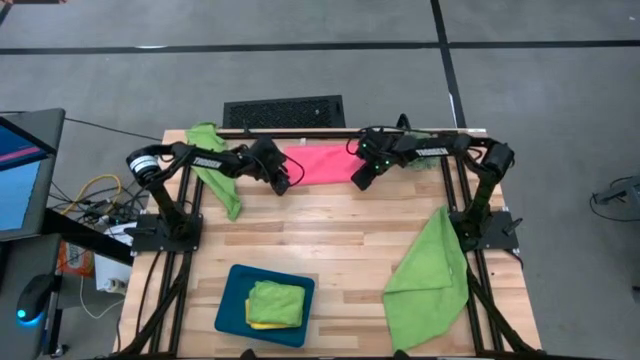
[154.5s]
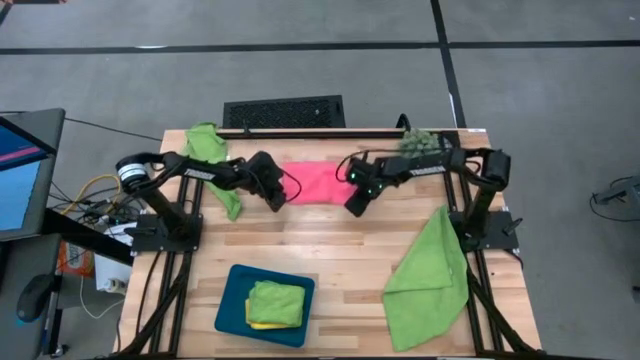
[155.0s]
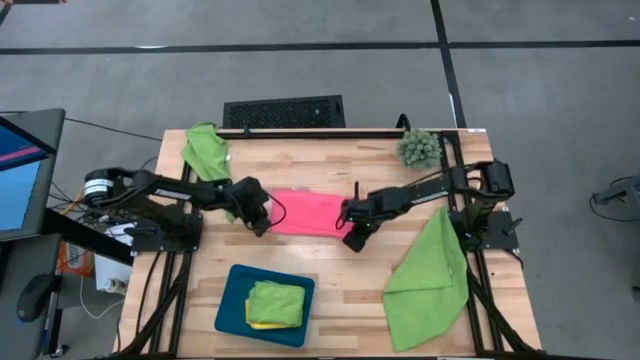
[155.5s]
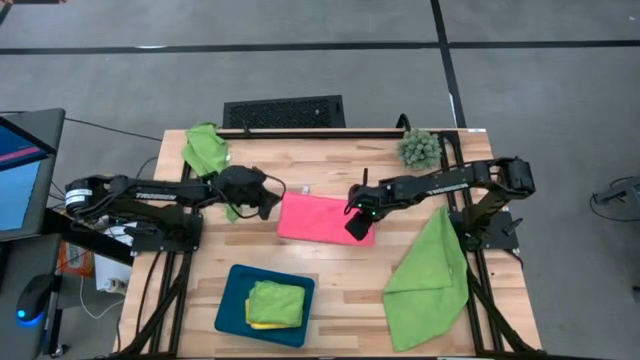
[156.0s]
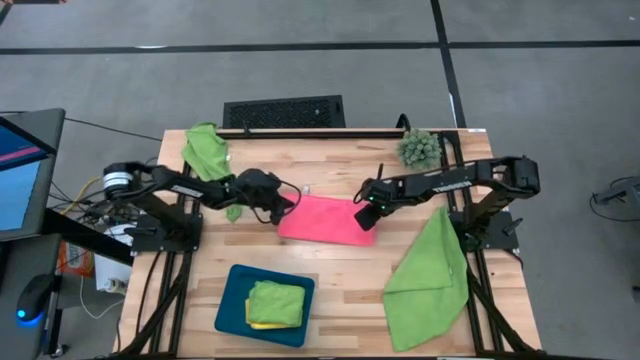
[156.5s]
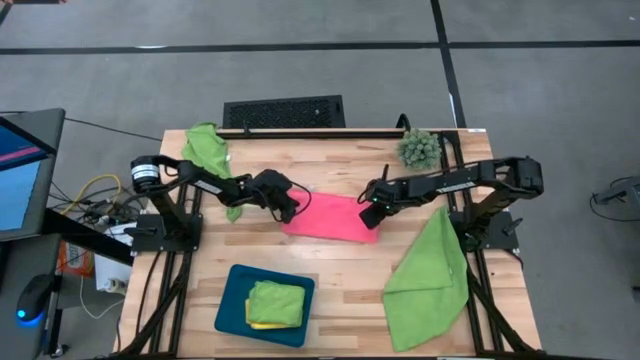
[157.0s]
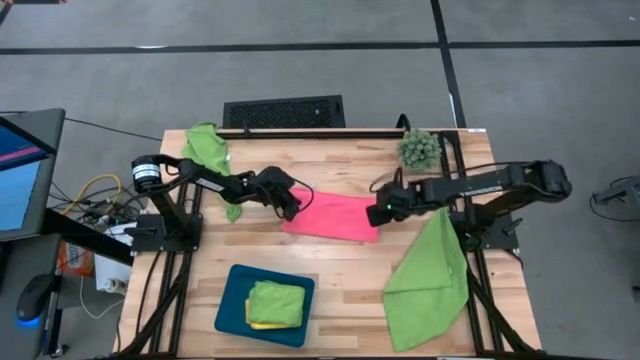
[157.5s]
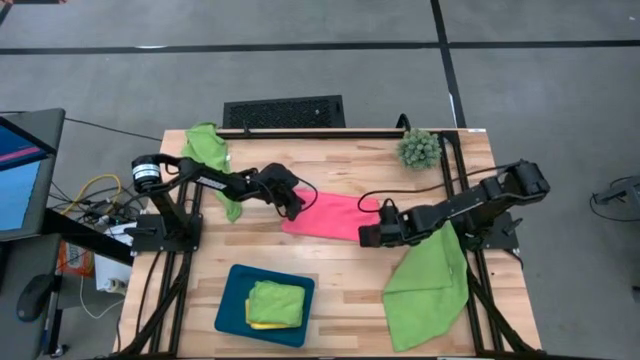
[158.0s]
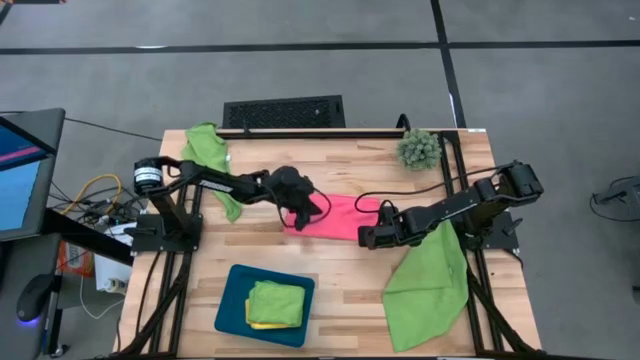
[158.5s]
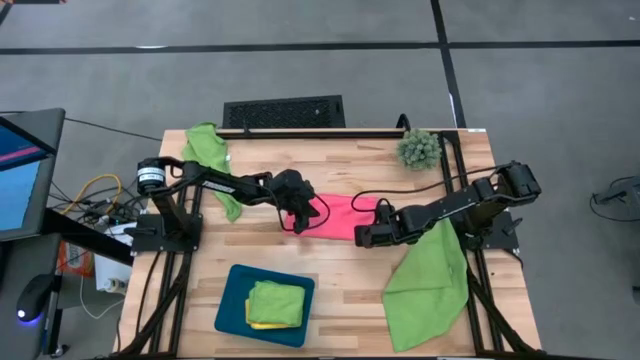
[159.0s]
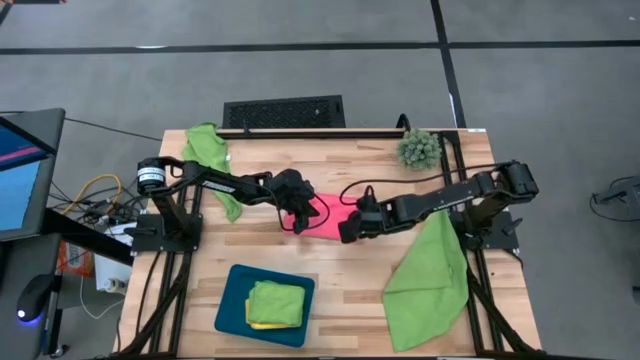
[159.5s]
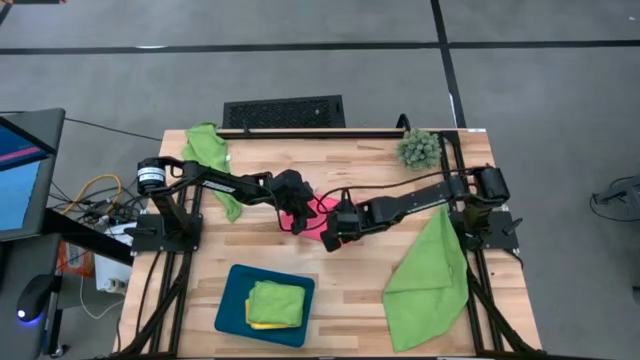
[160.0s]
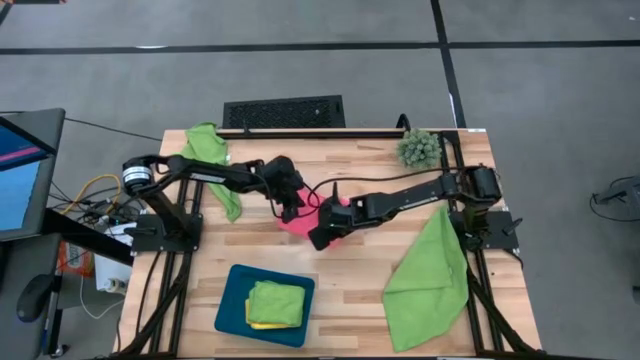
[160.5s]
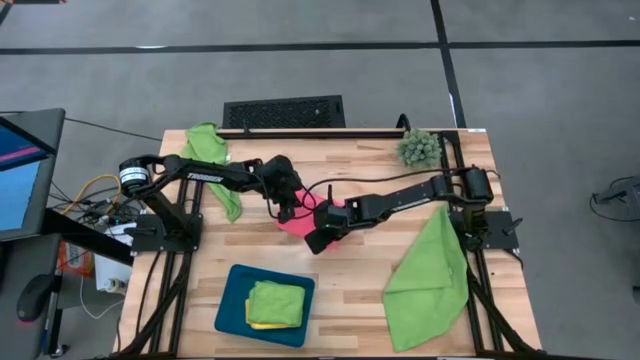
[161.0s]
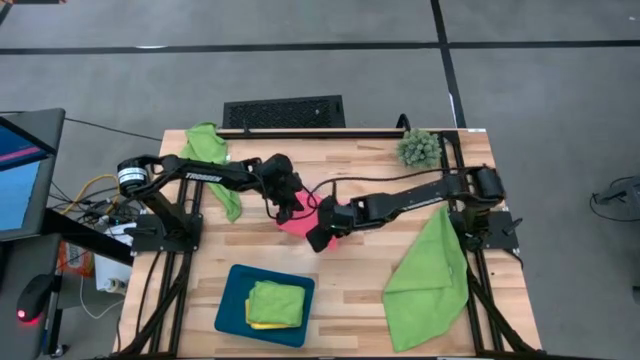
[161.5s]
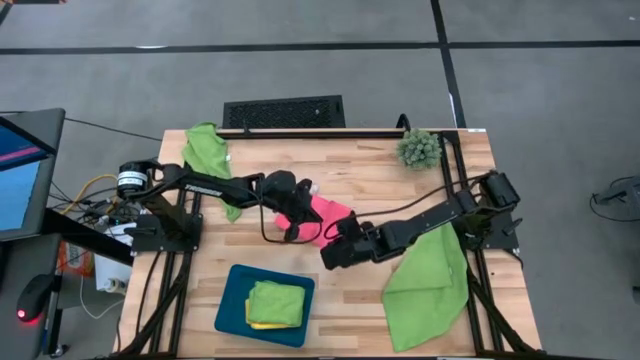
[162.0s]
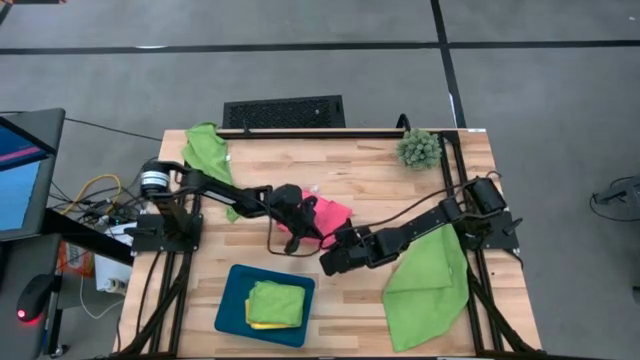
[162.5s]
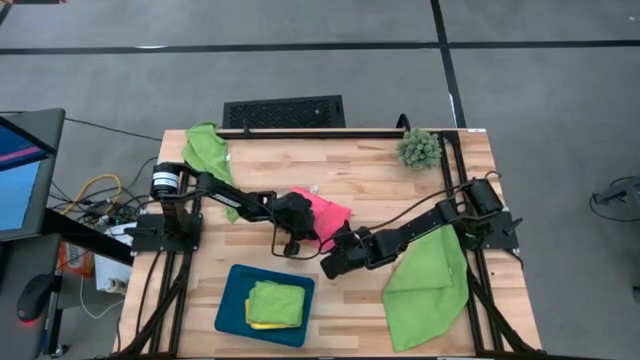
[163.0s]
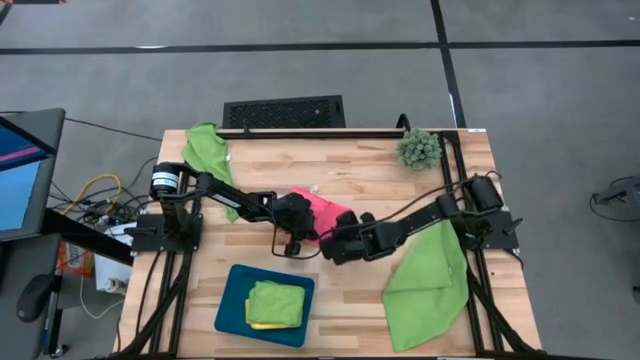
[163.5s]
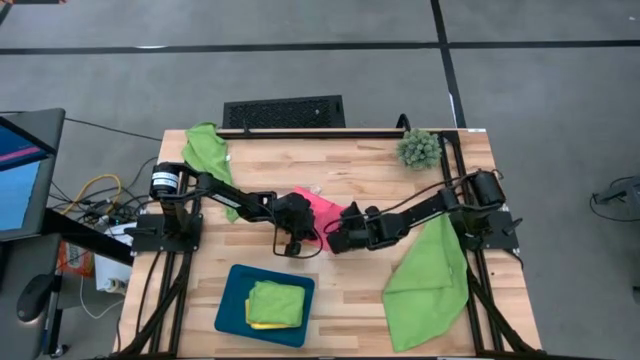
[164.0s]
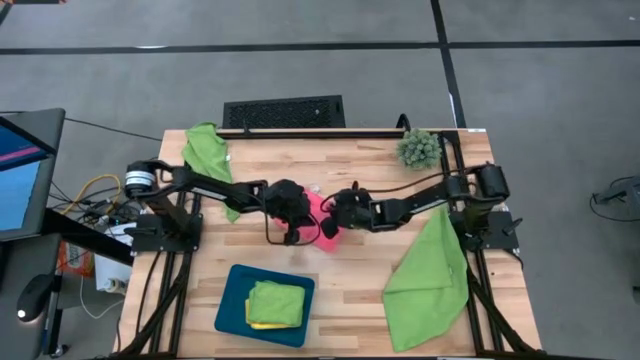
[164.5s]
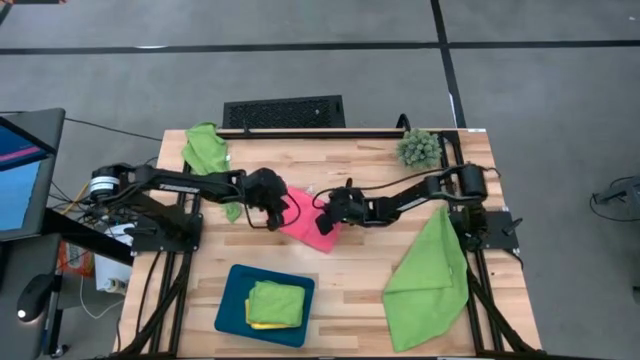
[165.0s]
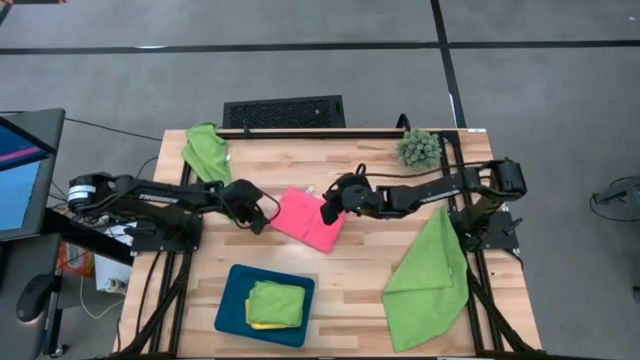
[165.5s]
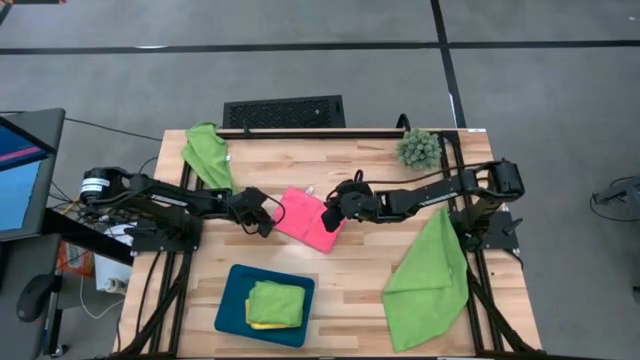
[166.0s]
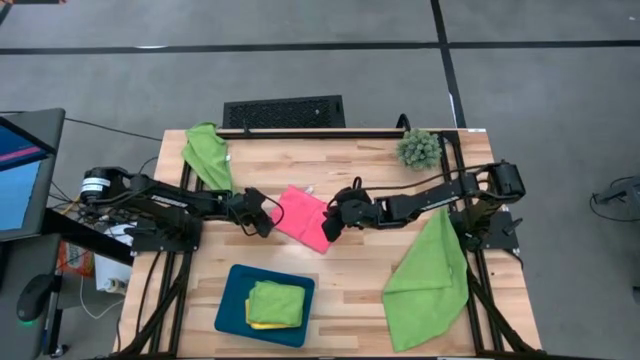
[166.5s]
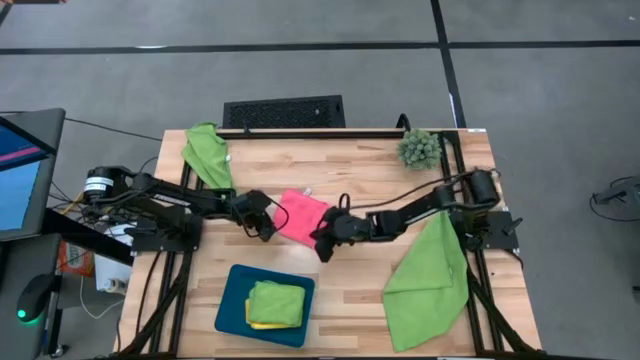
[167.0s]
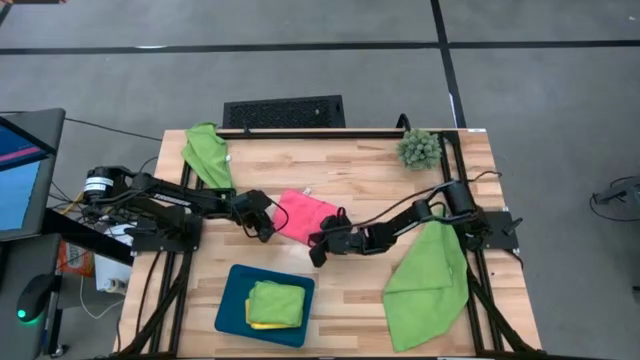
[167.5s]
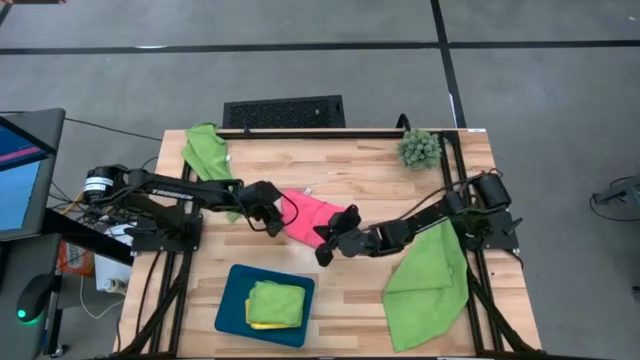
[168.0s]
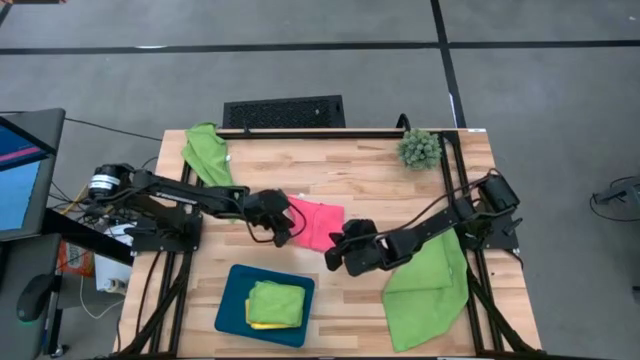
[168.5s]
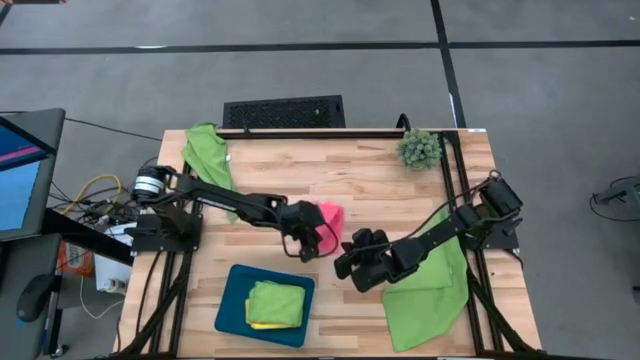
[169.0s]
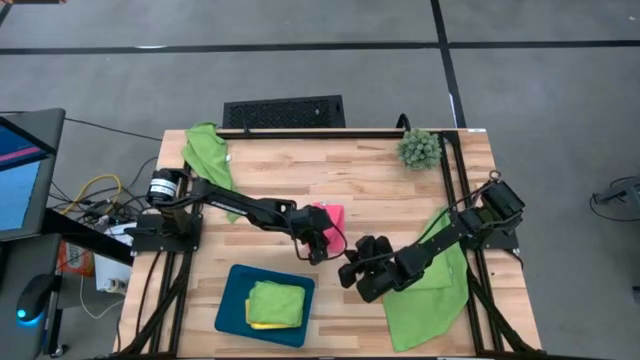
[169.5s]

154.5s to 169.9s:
Task: Fold microfiber towels
Fold the pink microfiber towel

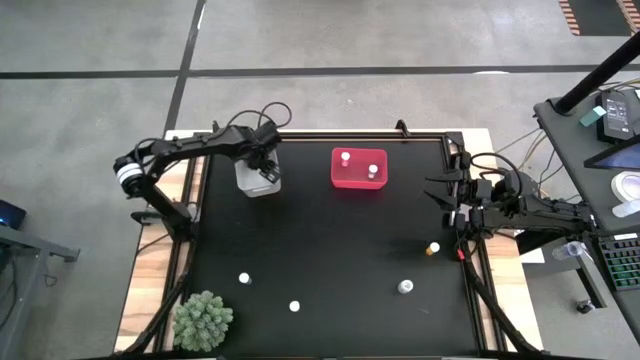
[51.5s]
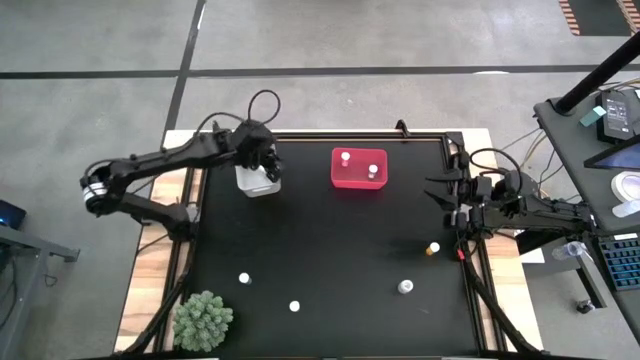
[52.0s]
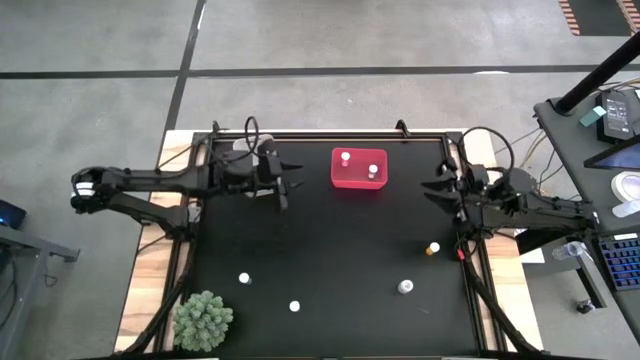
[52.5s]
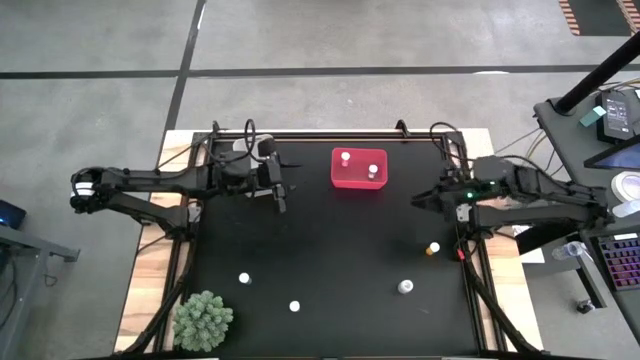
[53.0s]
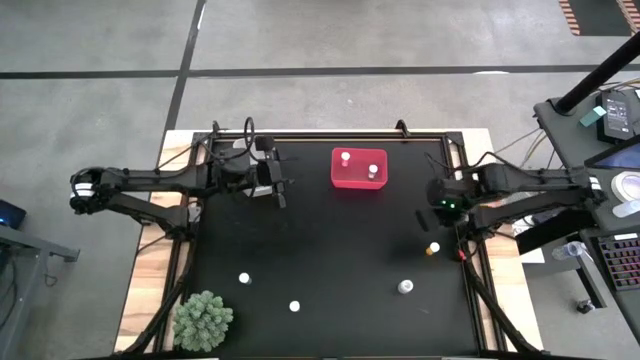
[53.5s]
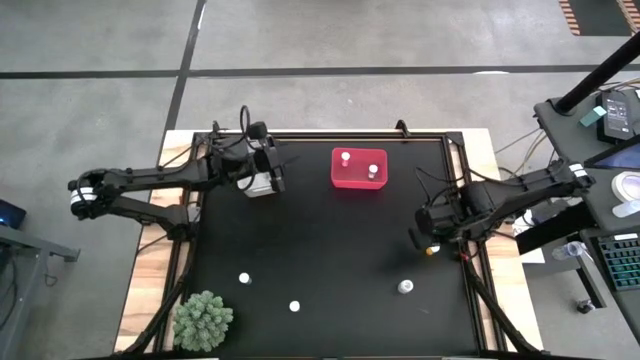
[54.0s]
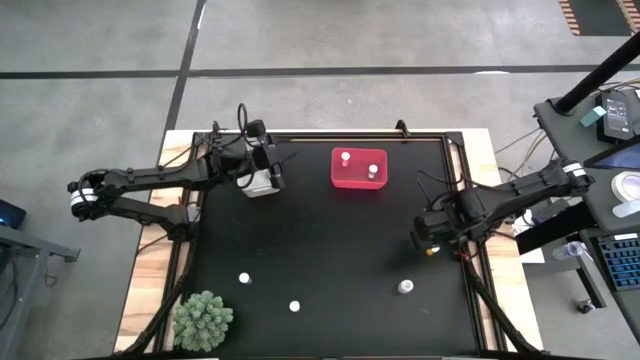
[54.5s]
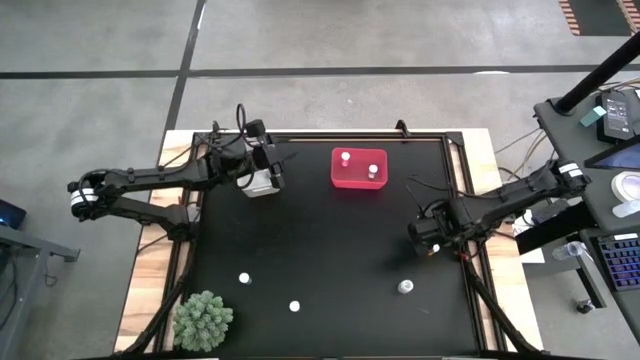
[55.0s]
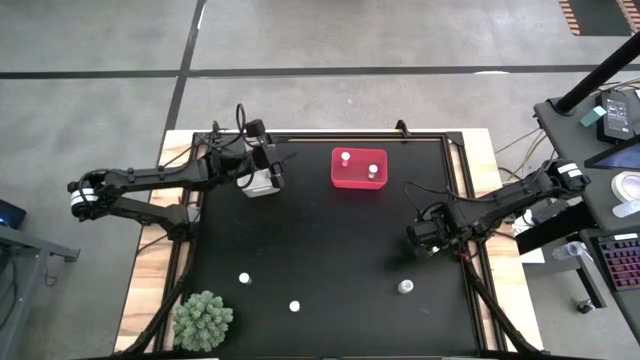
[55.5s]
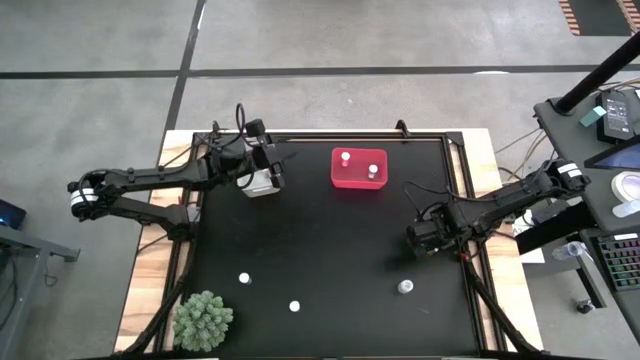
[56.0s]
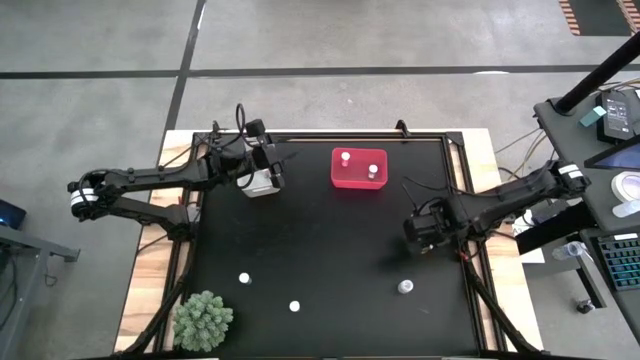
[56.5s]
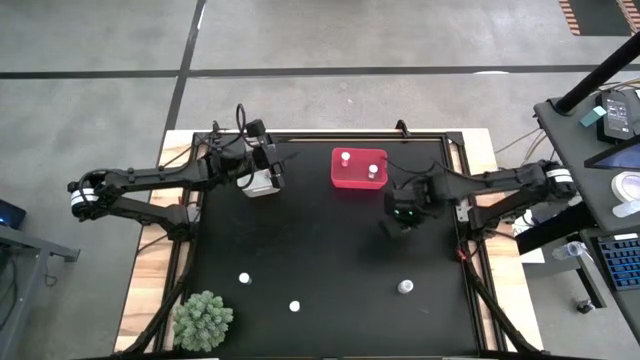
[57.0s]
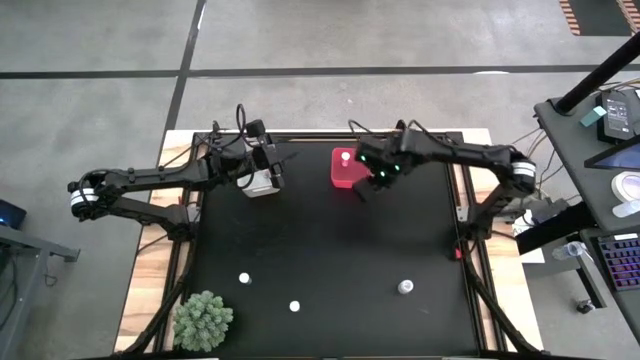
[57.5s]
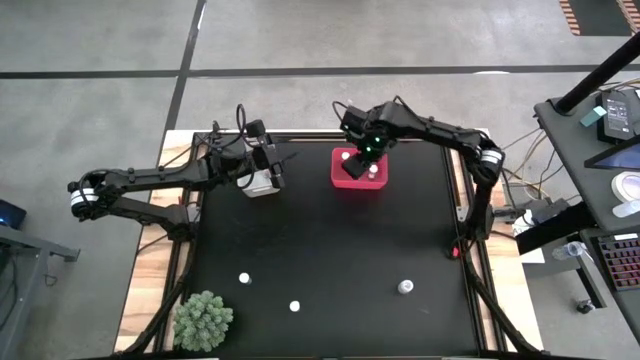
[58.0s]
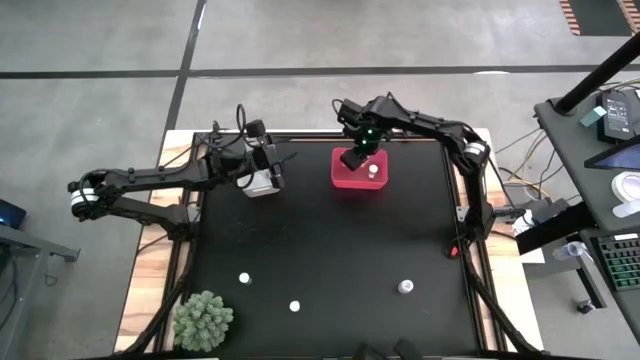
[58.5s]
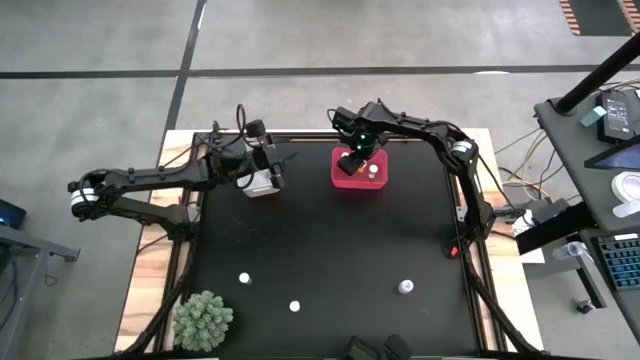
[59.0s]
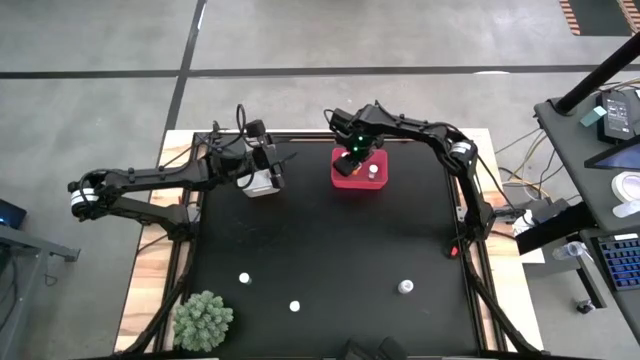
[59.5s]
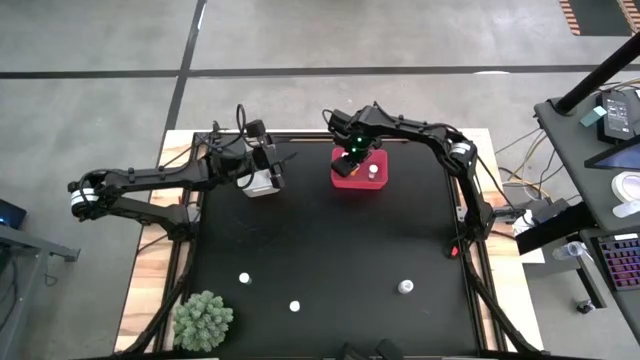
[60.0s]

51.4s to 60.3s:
Task: Pick and place medicine bottles into bin by pill shape (circle, oval)
Put the orange tablet bottle into the red bin
